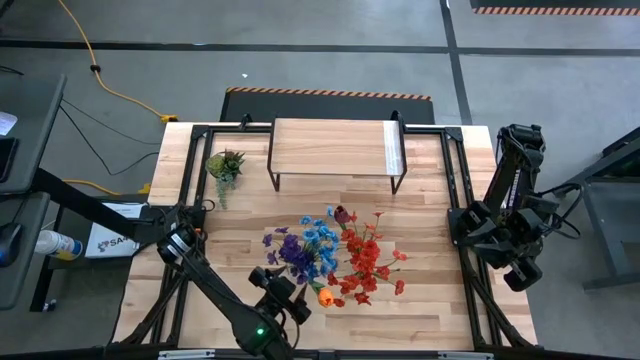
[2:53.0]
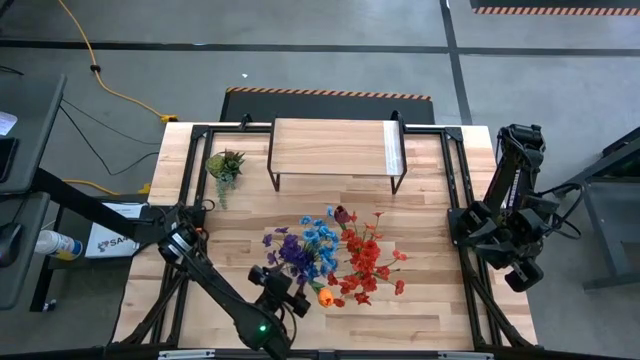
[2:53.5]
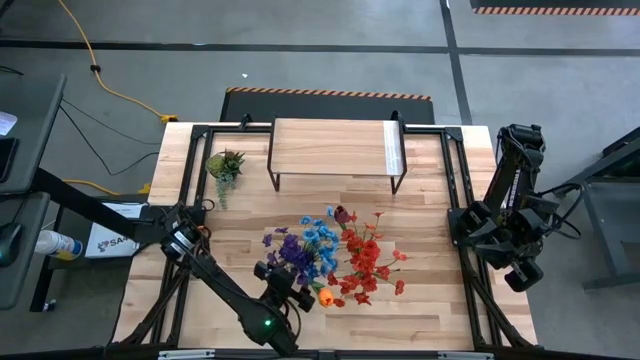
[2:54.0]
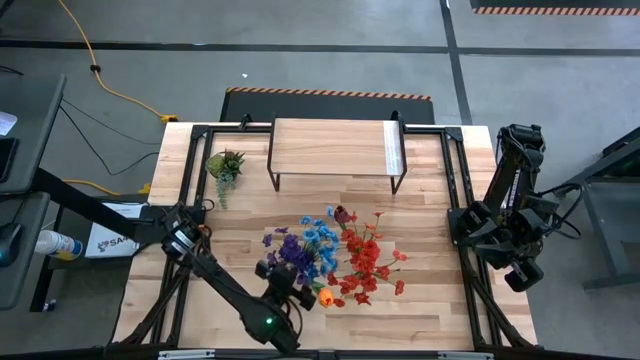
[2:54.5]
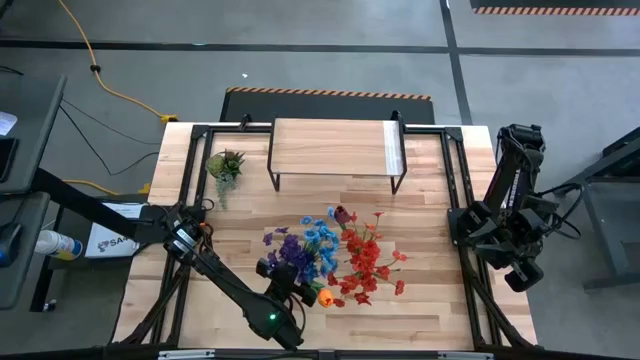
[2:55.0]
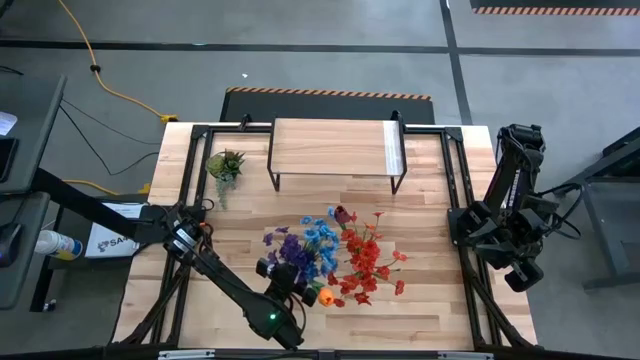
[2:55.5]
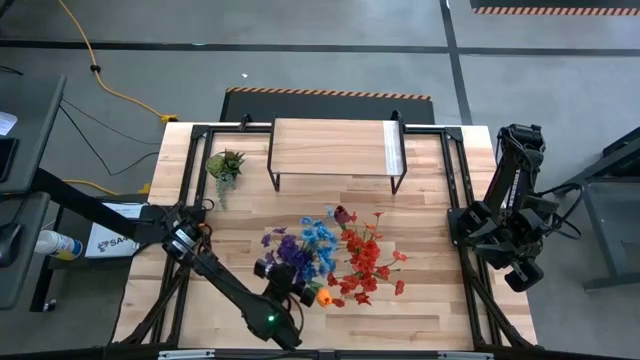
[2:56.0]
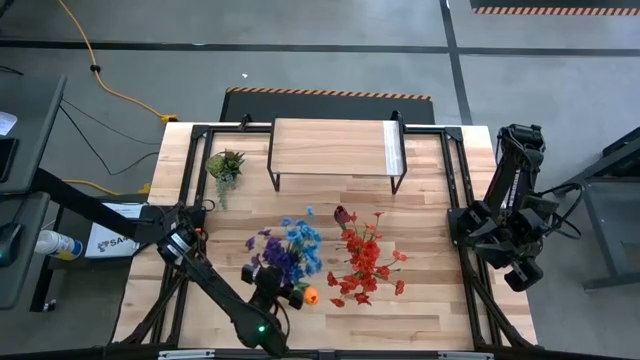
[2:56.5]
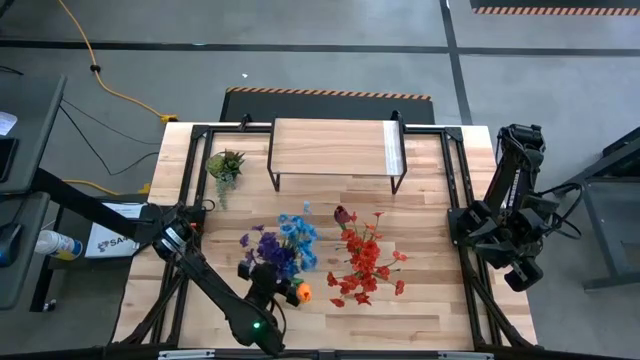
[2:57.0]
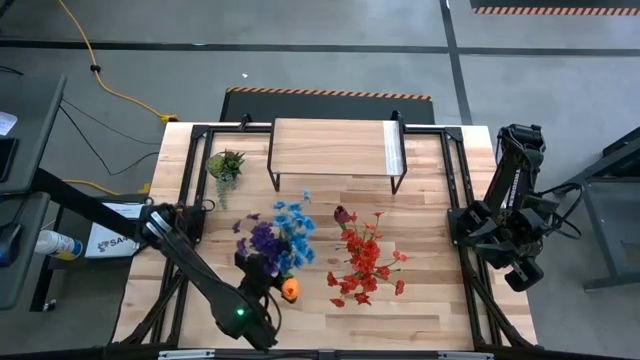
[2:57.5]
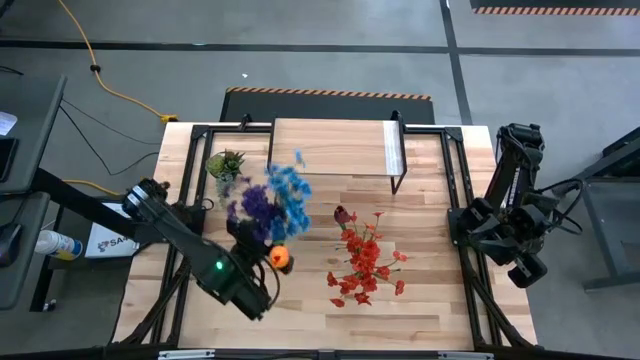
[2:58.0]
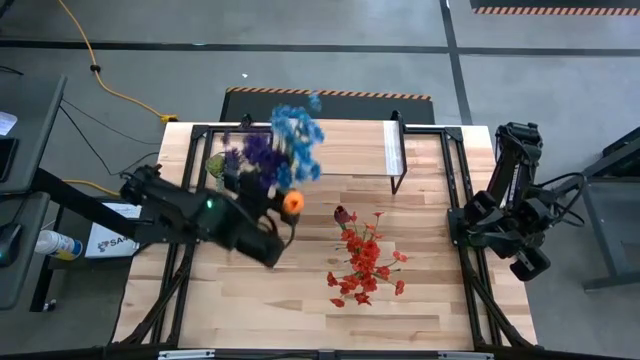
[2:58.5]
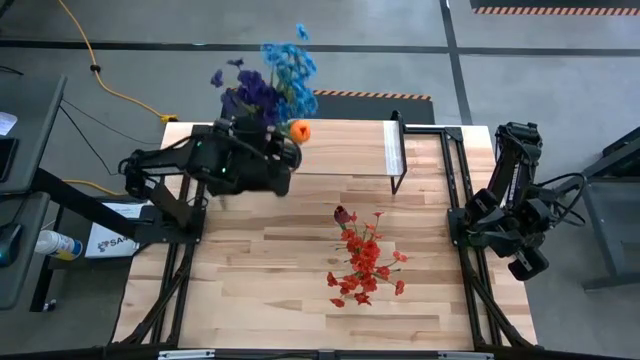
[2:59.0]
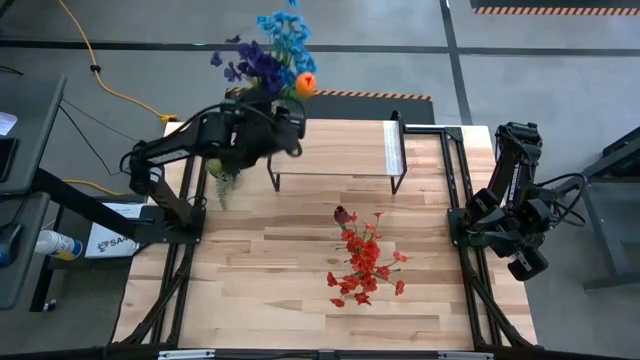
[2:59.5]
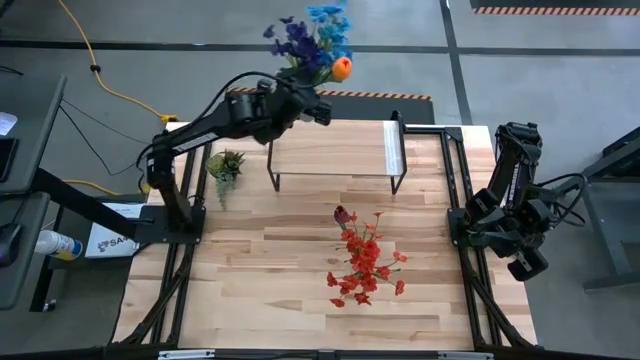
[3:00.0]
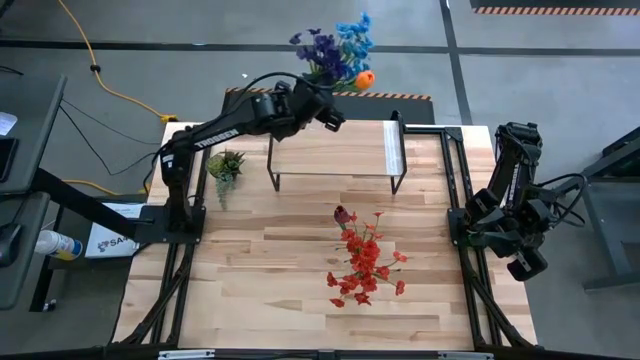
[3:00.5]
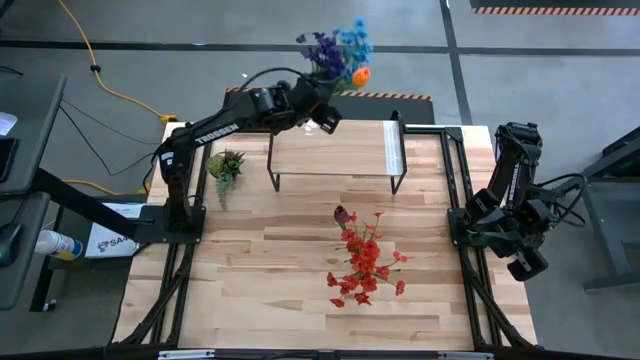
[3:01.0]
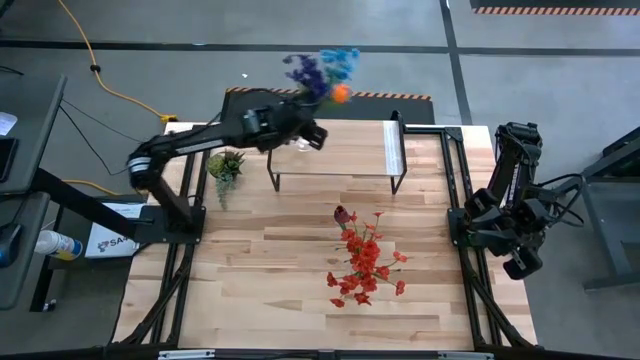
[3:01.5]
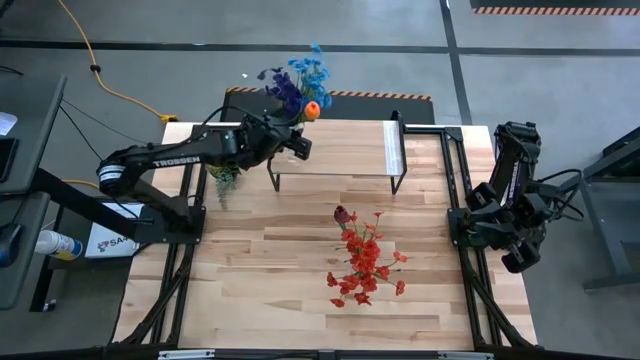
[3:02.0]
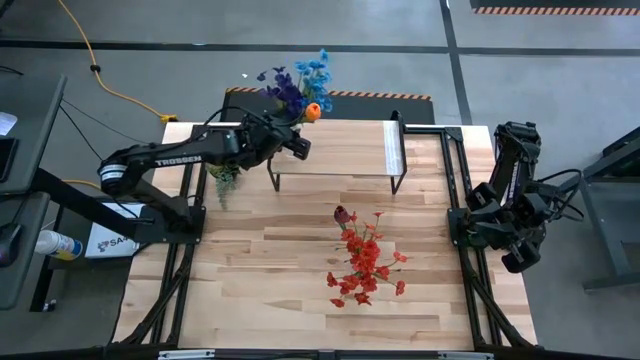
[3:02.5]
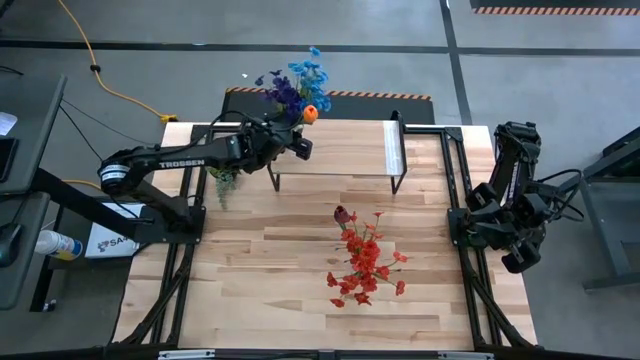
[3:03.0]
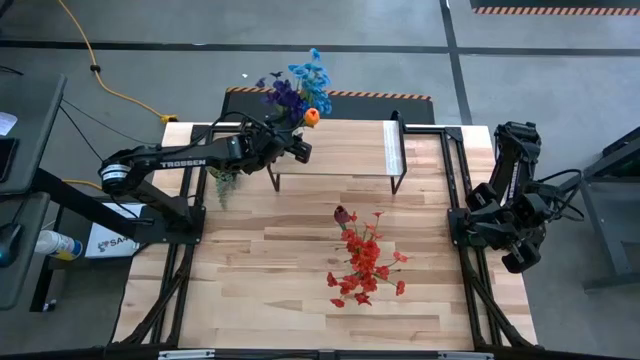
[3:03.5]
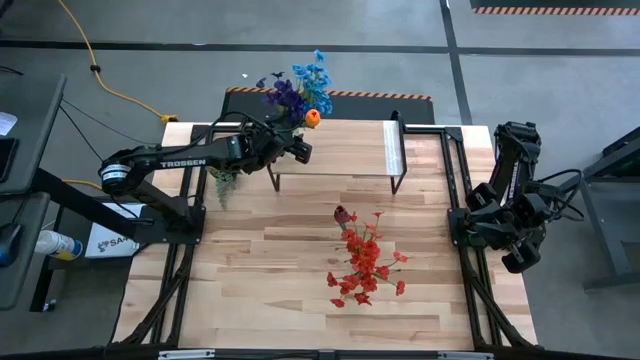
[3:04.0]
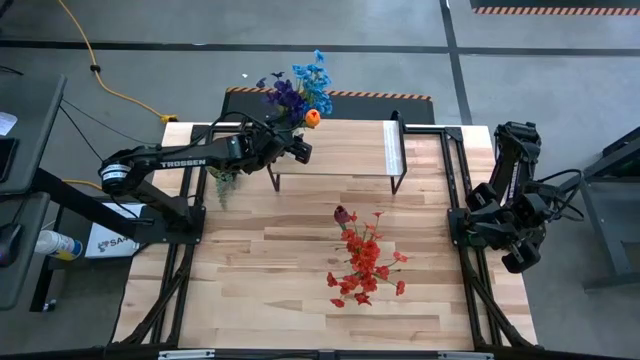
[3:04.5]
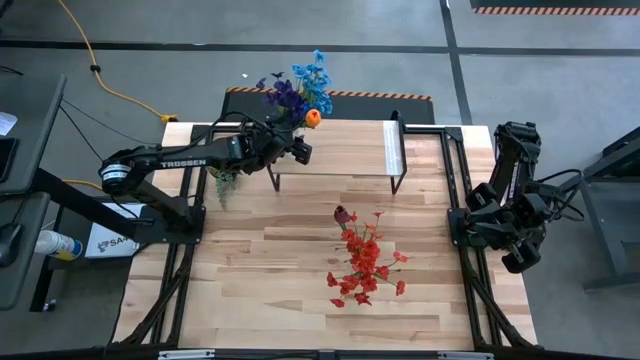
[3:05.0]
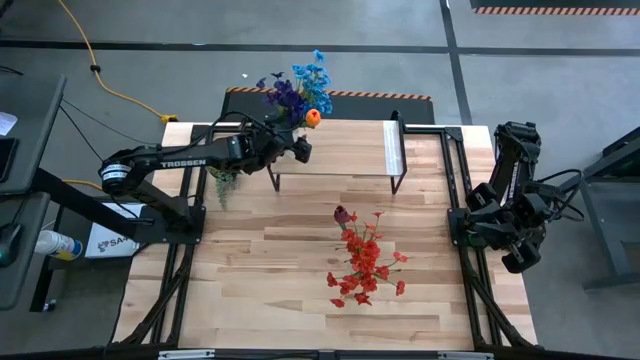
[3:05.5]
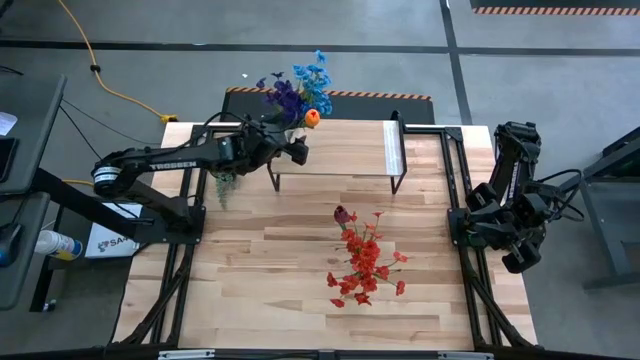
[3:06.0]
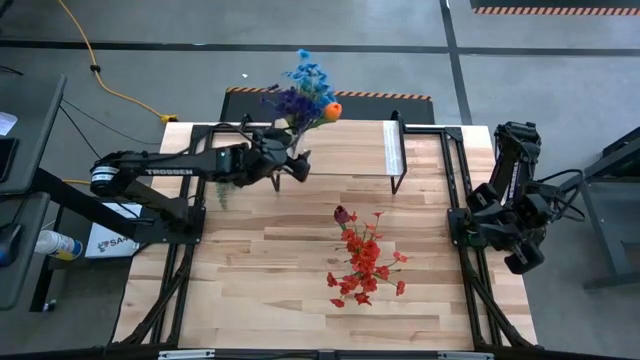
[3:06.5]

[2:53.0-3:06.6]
Task: Pick and place flowers into a vace then onto a shelf
Put the left transparent flower vase with the flowers on the shelf

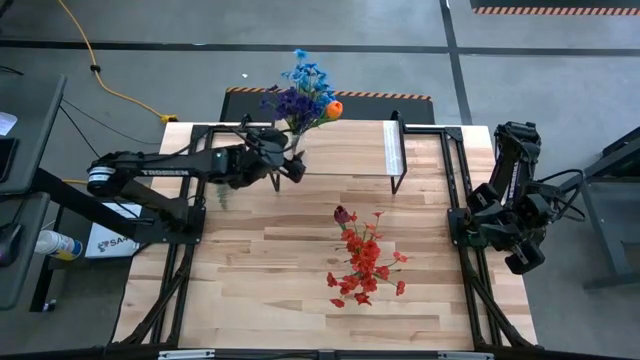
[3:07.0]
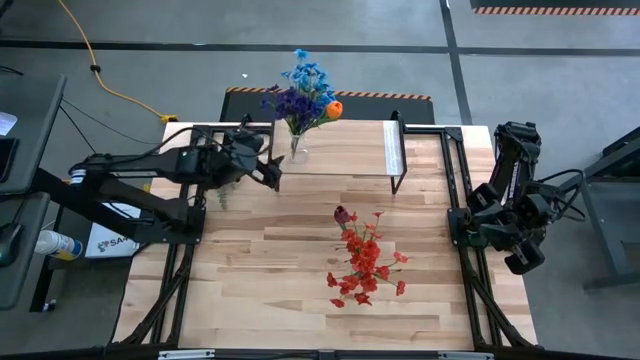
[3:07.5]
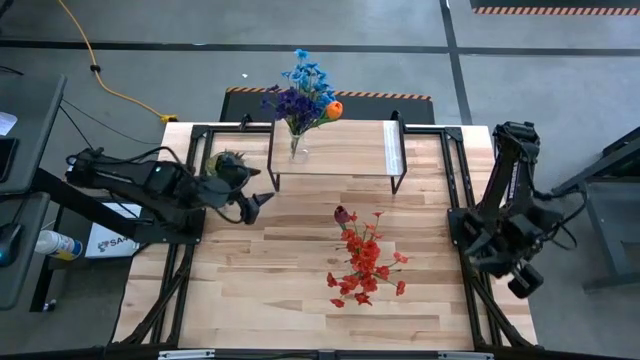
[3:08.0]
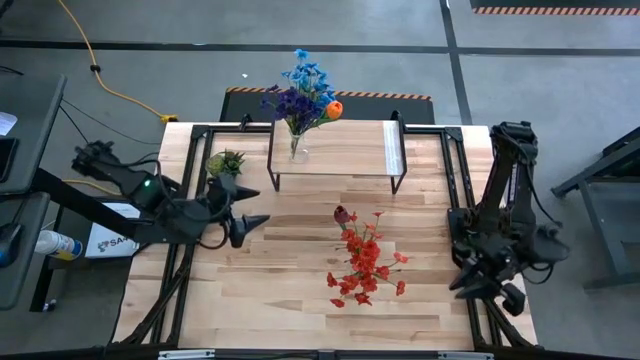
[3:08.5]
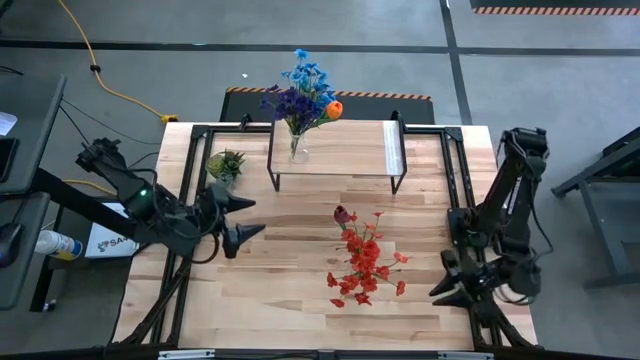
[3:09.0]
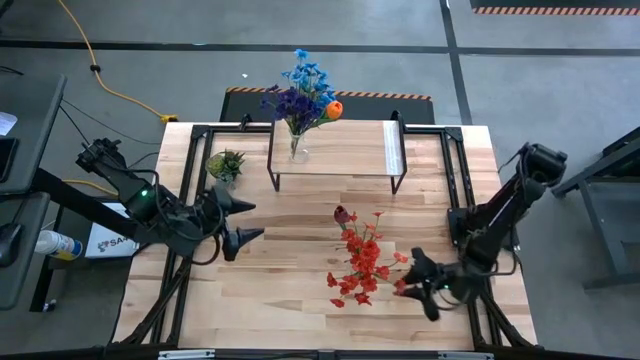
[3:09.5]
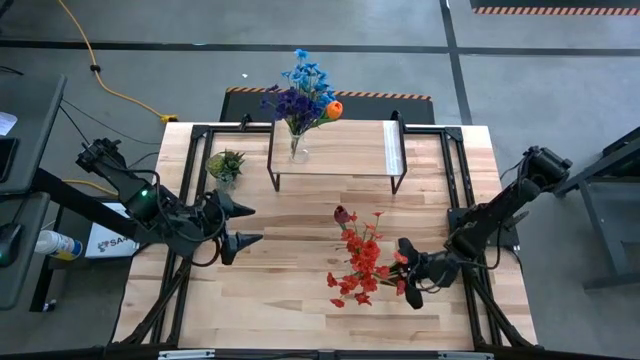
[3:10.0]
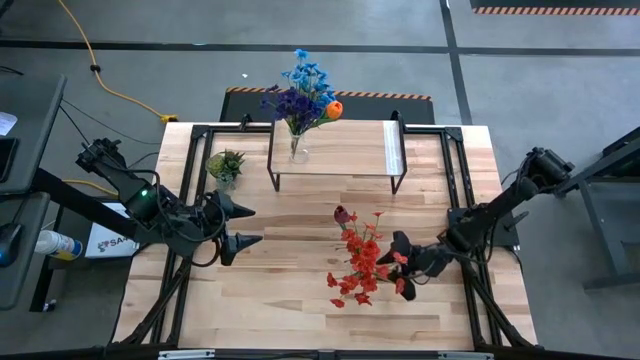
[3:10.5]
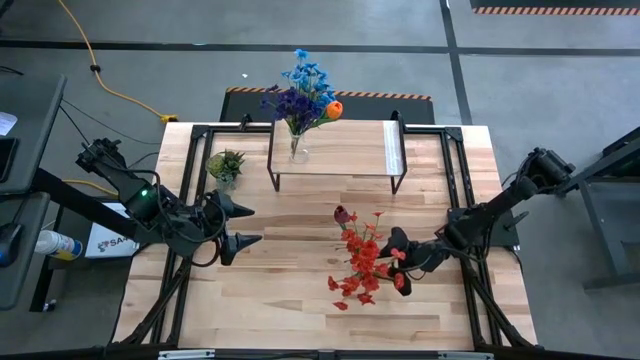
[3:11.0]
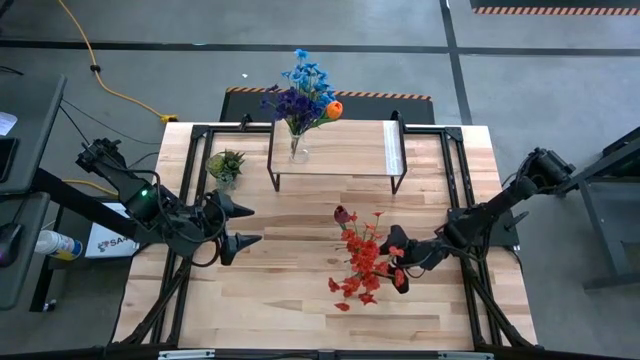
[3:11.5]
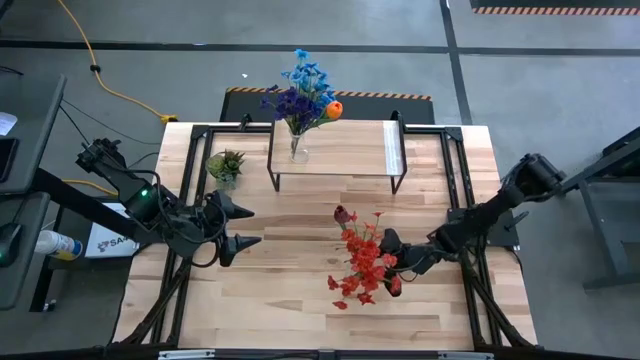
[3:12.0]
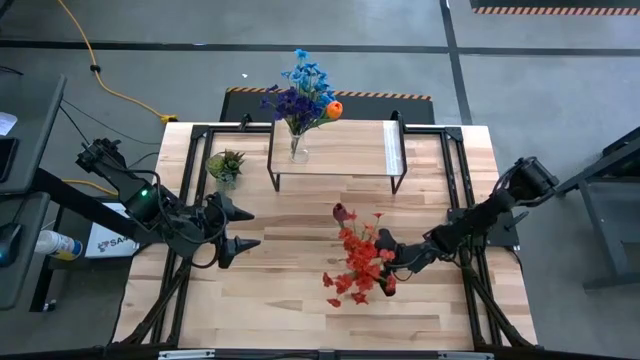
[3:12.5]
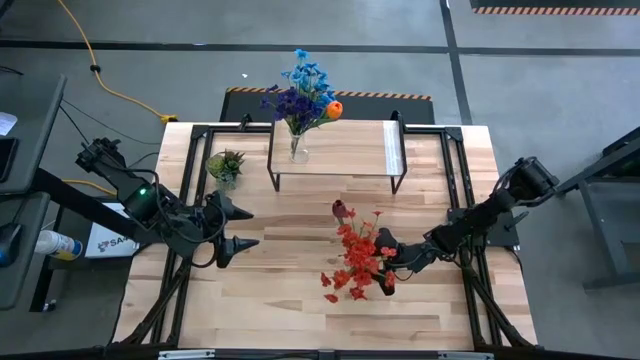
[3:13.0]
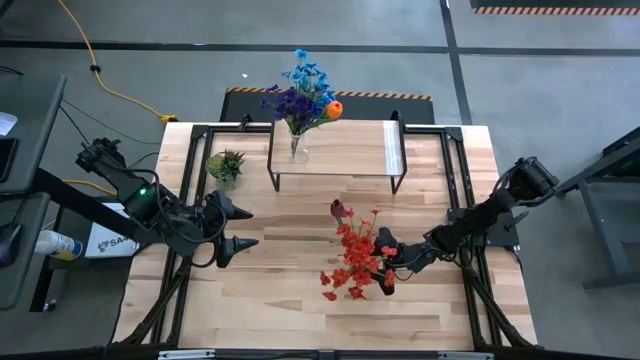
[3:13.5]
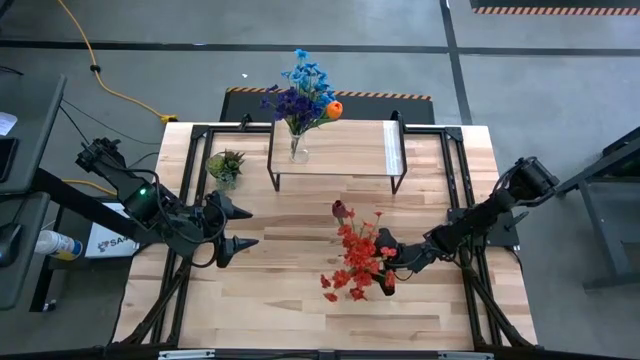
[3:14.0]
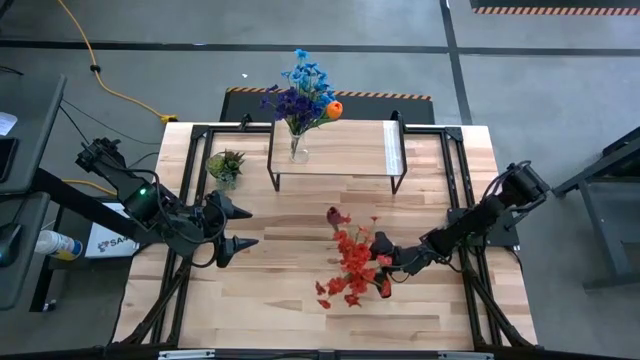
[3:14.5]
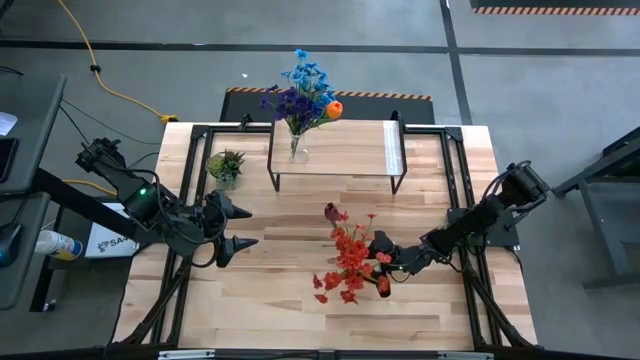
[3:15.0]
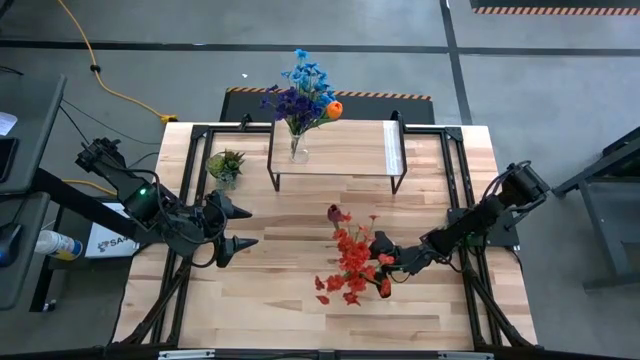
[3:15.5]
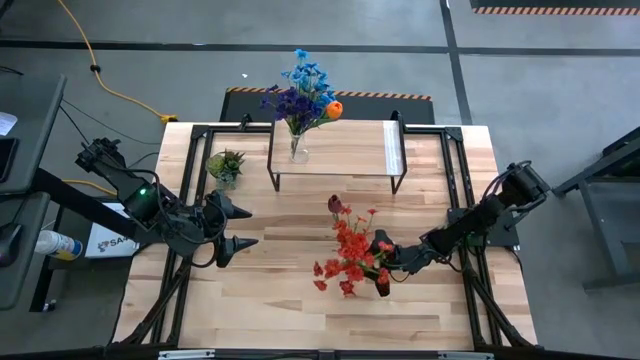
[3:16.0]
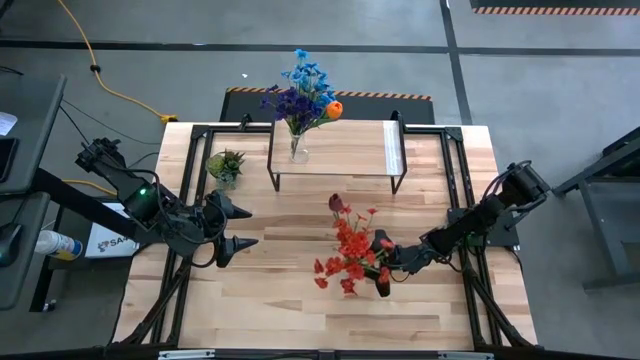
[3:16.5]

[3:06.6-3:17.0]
Put the transparent flower vase with the flowers on the shelf
